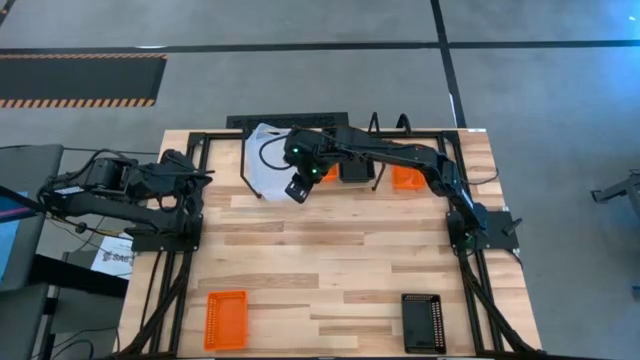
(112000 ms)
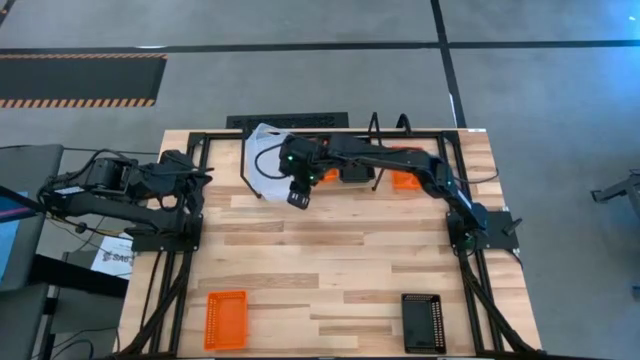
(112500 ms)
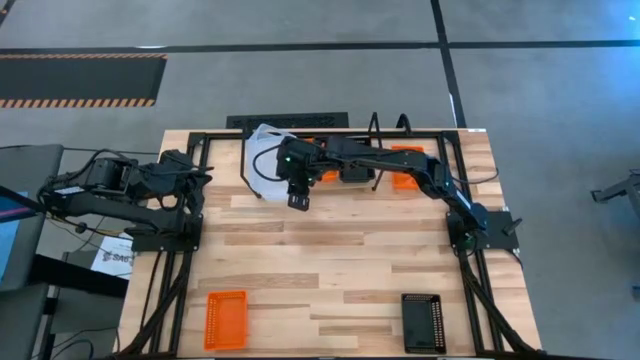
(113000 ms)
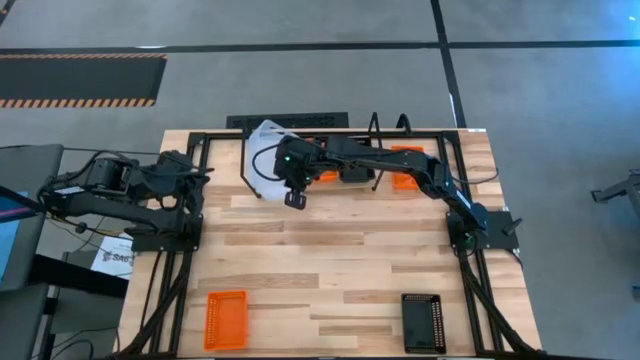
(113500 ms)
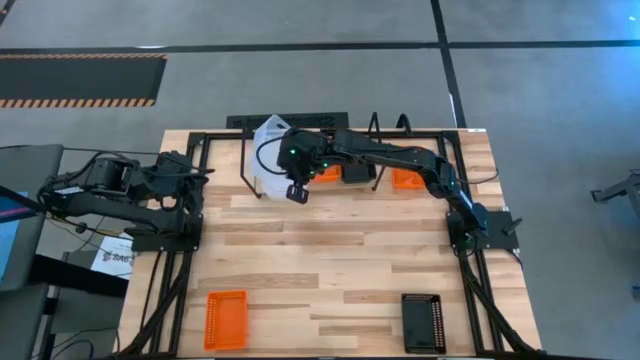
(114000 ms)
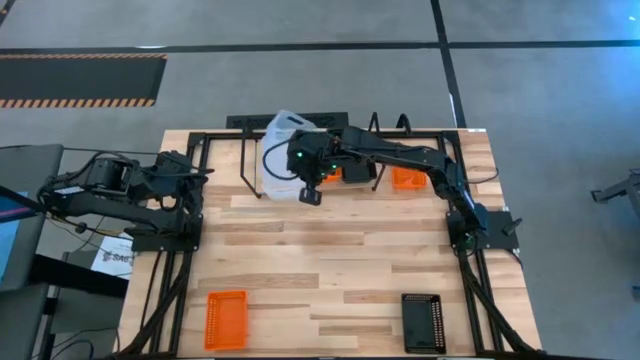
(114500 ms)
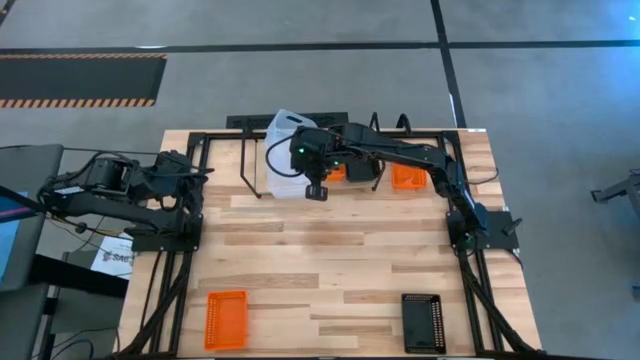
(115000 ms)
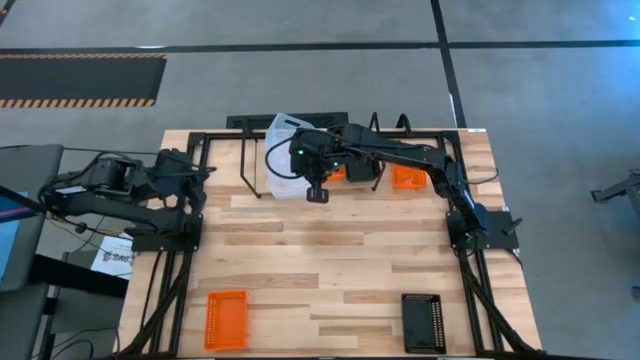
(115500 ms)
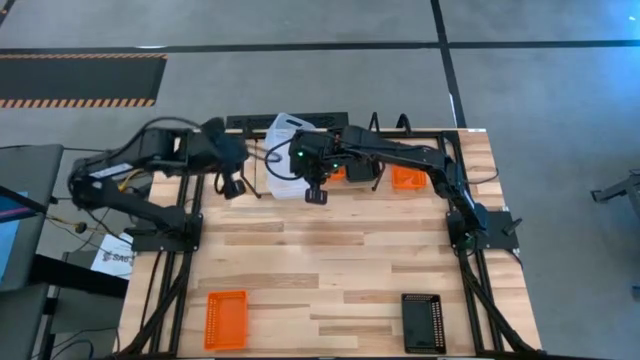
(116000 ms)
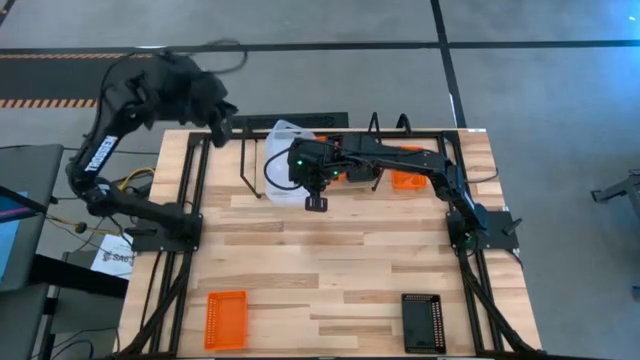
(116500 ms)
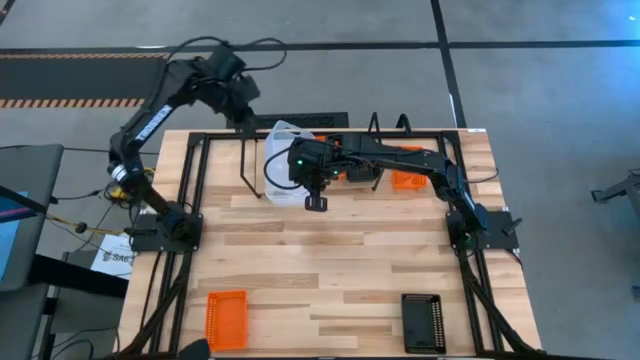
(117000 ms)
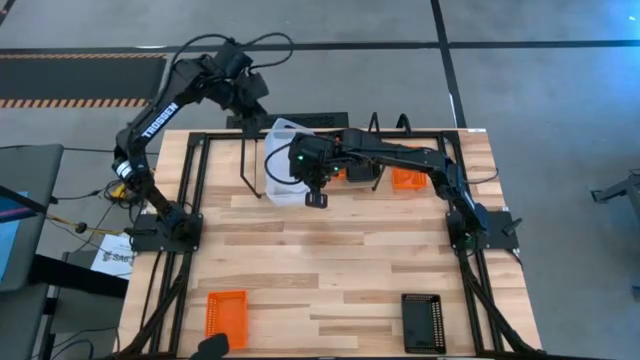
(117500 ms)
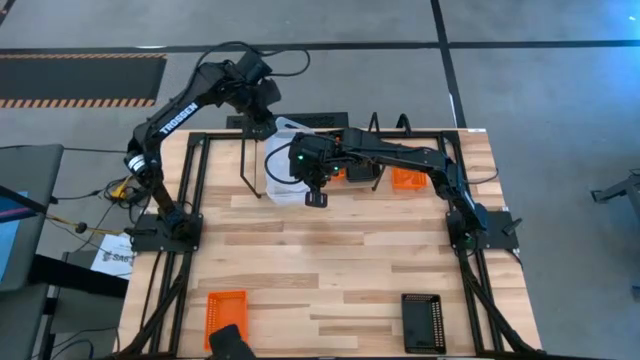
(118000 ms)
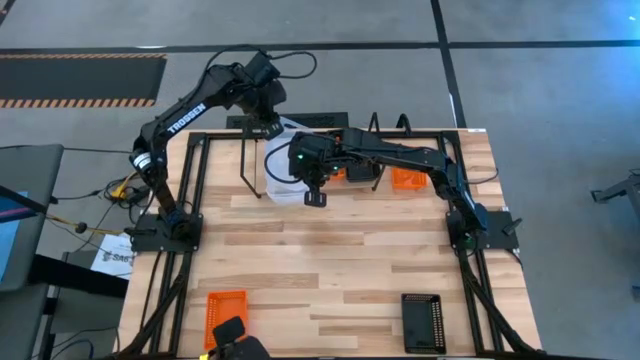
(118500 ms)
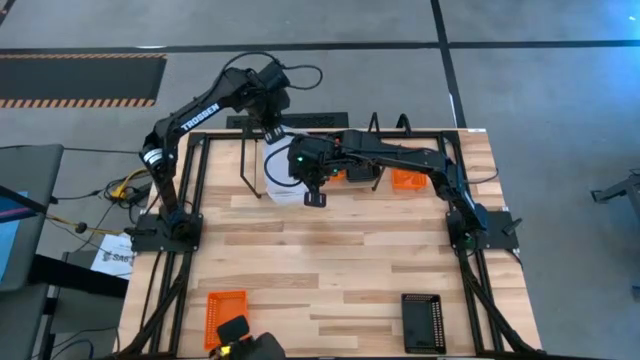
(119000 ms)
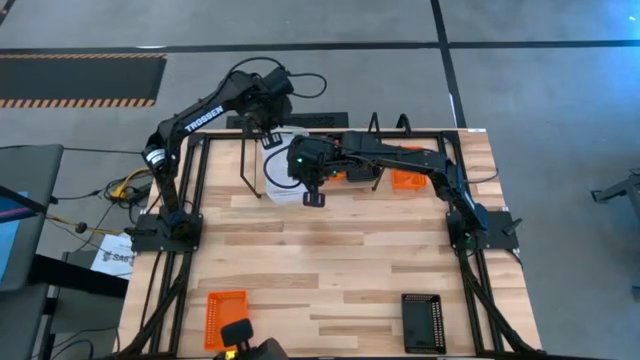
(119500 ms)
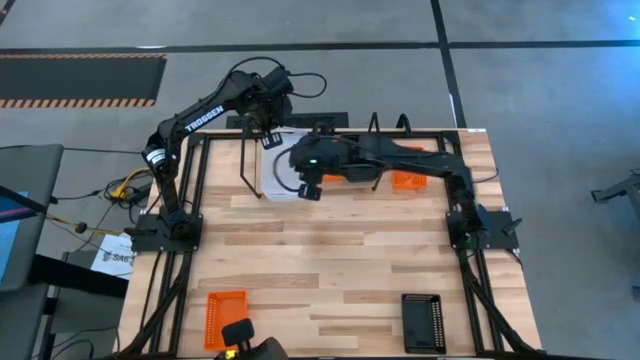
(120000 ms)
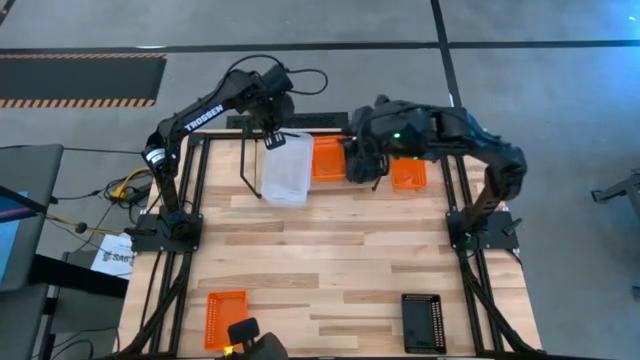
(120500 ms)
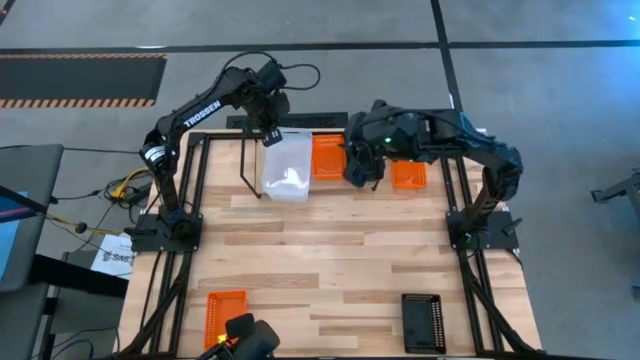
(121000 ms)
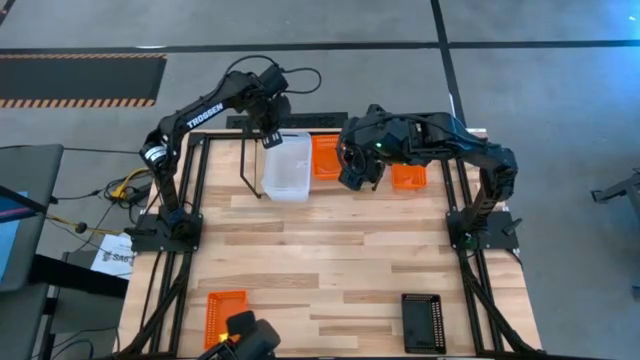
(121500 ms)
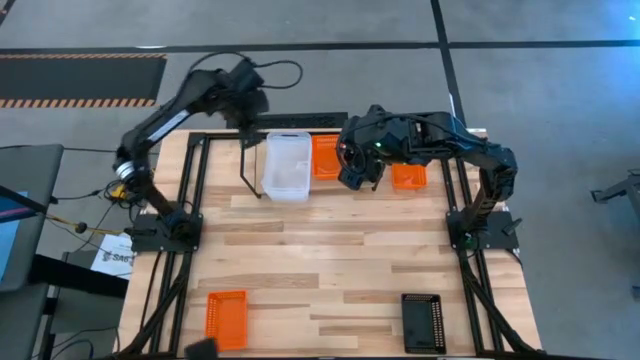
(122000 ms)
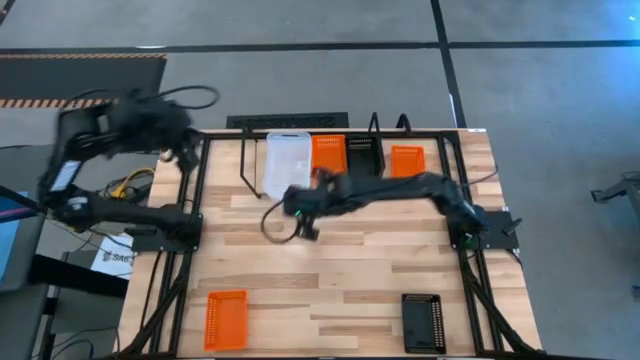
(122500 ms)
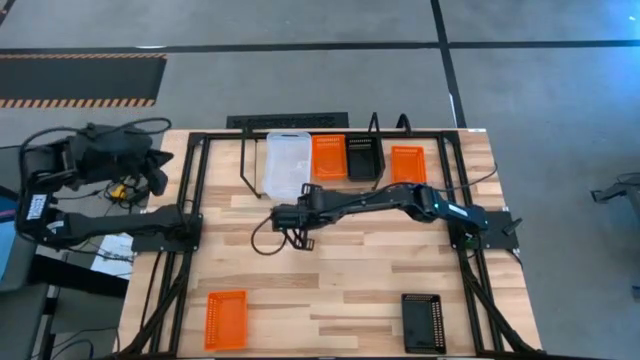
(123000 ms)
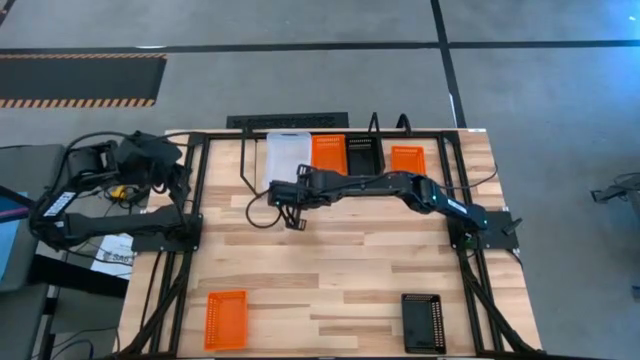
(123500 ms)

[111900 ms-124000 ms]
Task: Stack baskets on shelf by color
Stack the transparent bin on top of the transparent bin on the shelf

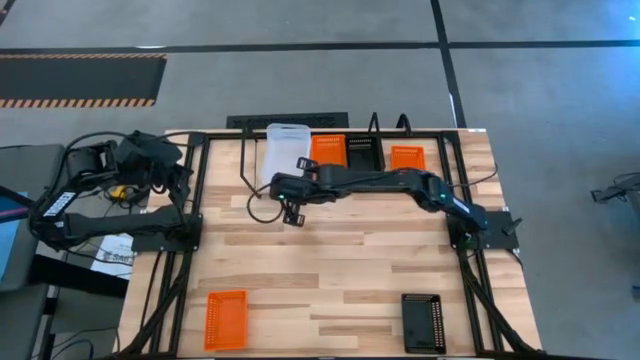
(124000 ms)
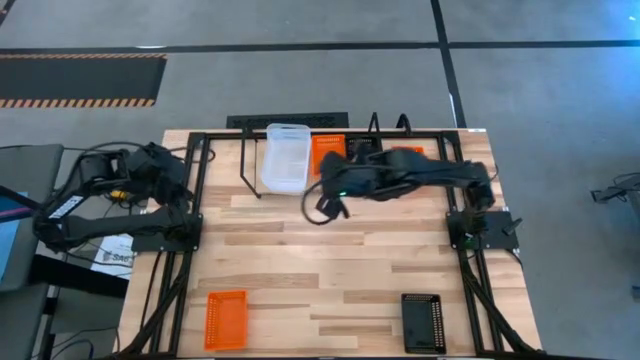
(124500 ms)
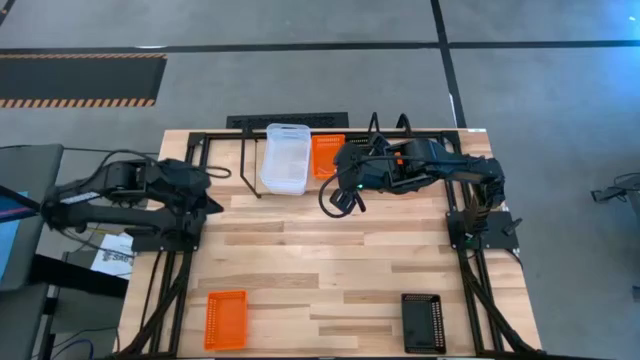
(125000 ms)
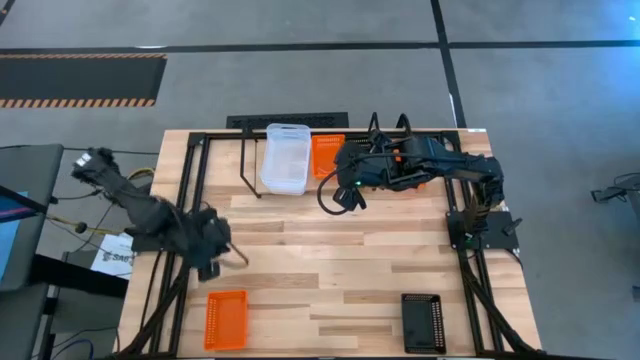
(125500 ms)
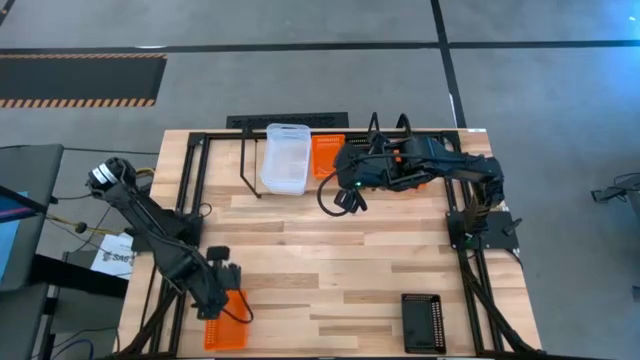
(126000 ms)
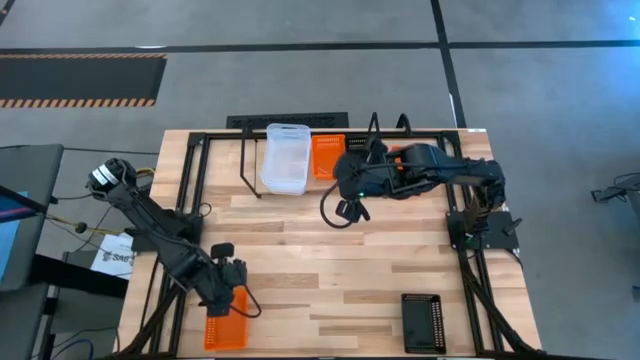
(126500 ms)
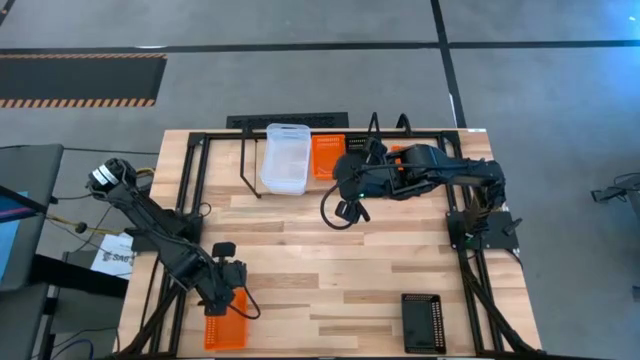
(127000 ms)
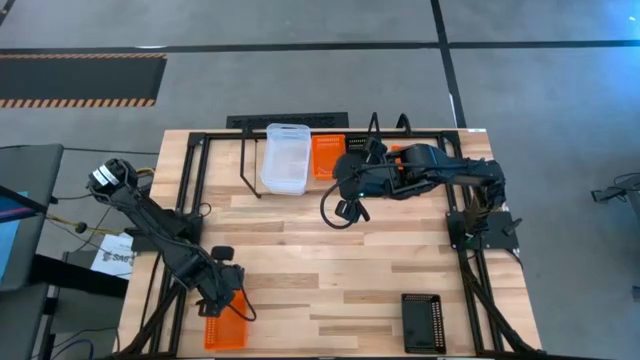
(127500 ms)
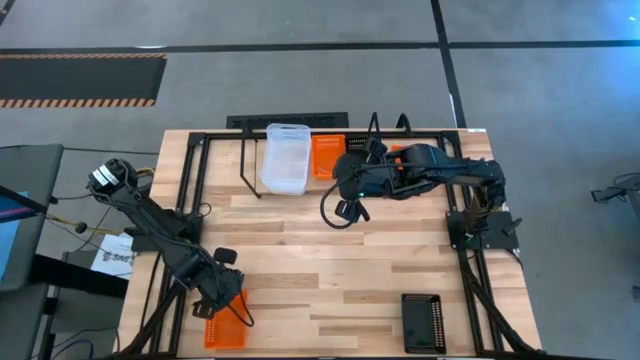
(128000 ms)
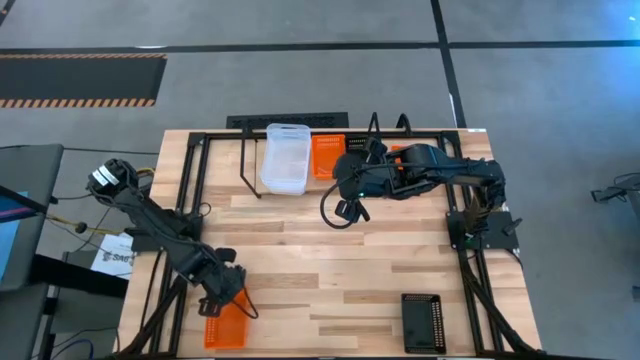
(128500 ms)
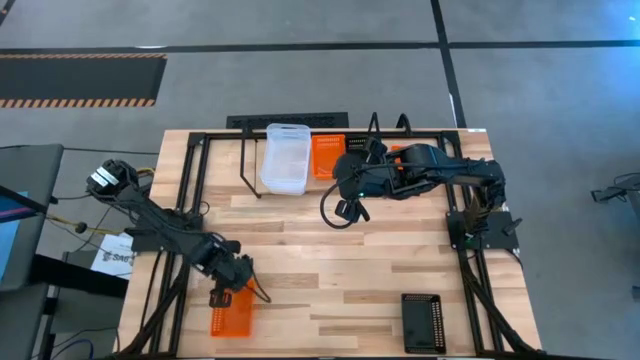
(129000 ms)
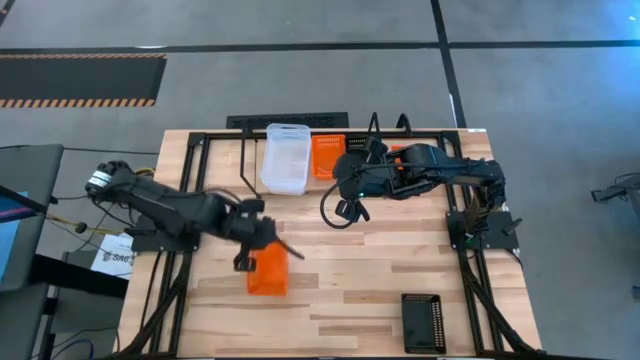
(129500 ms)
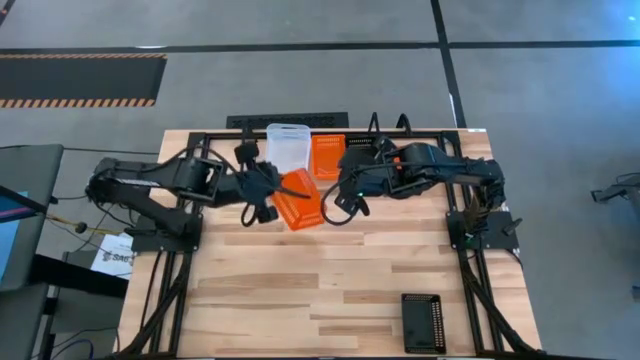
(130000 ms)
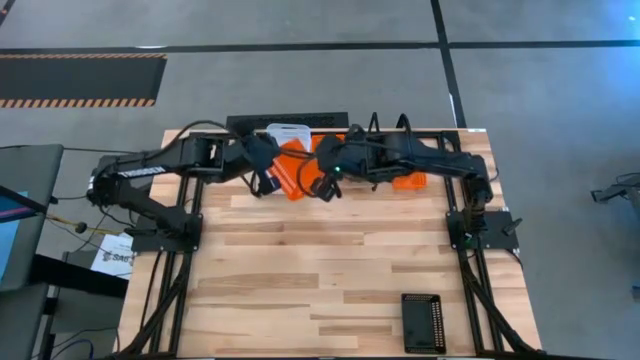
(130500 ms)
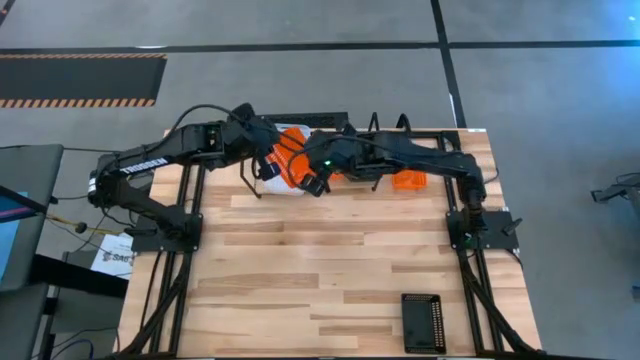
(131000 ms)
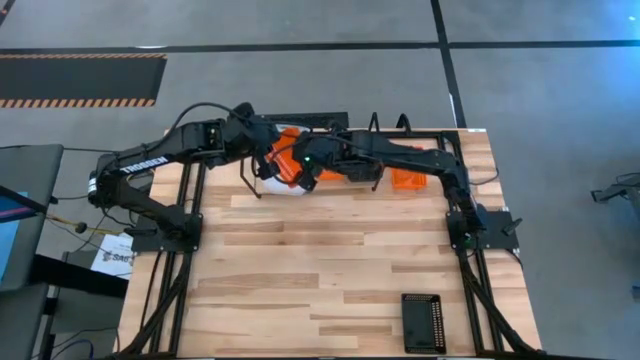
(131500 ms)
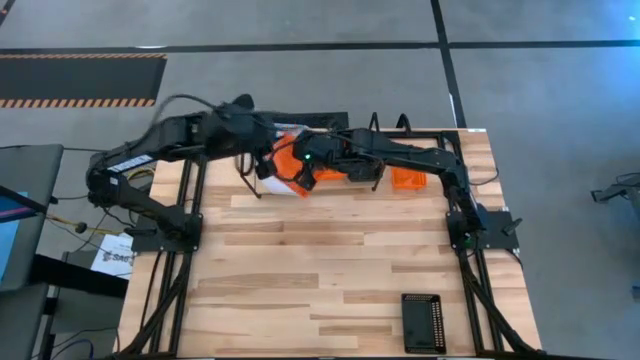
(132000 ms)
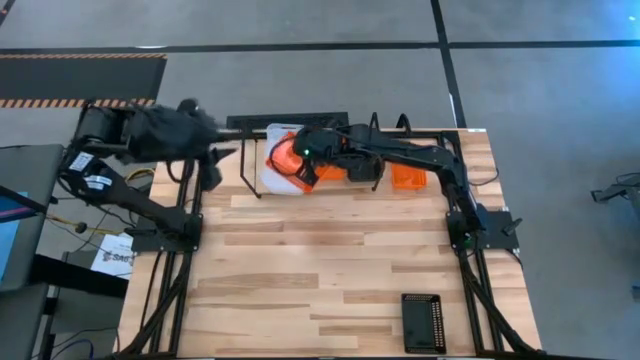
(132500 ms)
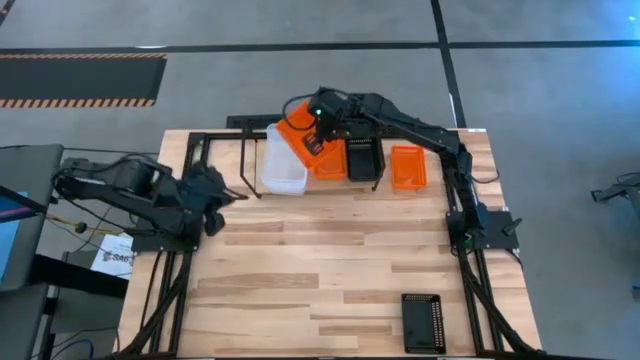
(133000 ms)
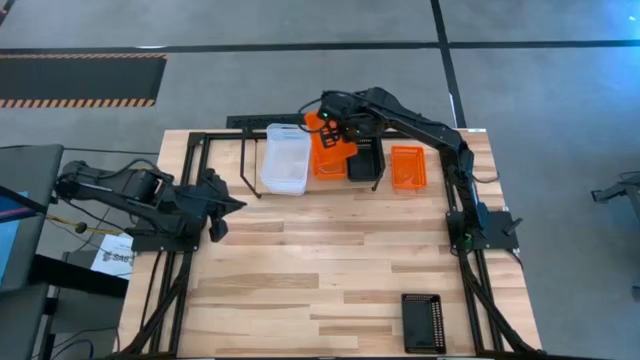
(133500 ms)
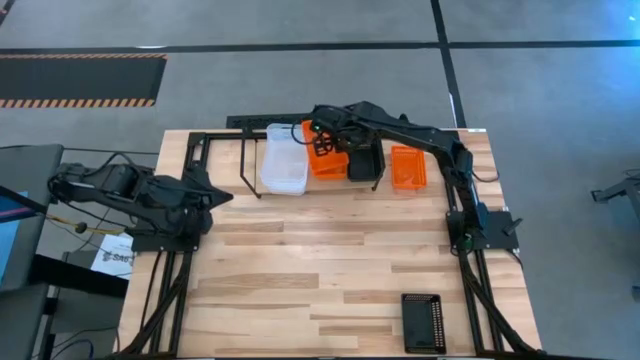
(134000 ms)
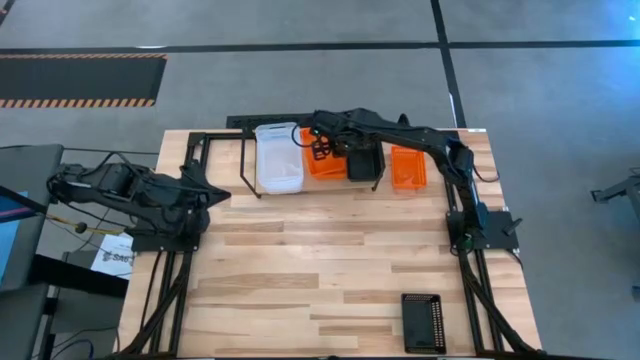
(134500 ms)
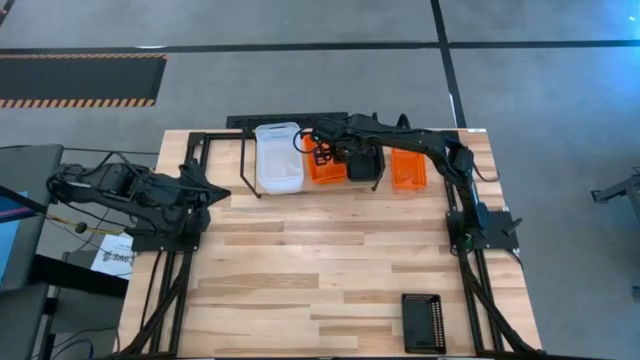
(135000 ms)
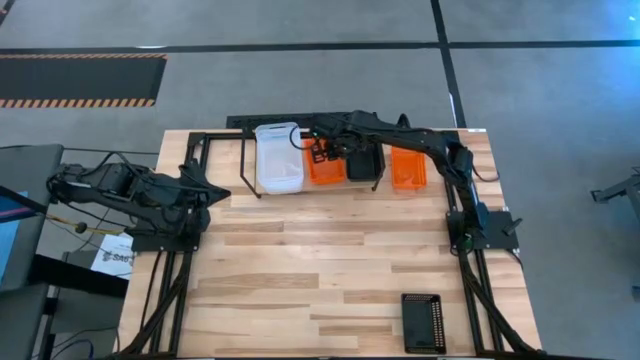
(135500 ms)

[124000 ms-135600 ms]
Stack the bottom orange bin on top of the orange bin on the shelf
